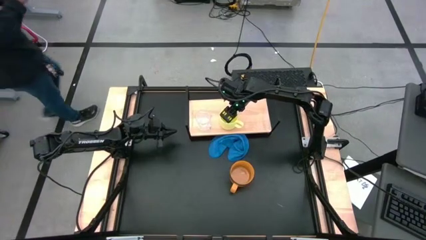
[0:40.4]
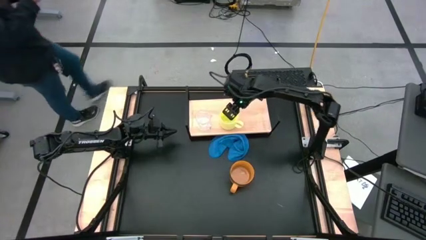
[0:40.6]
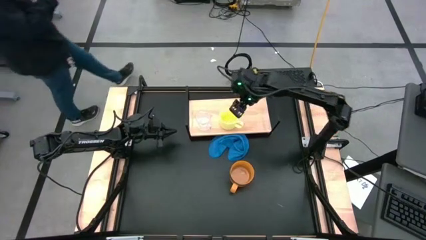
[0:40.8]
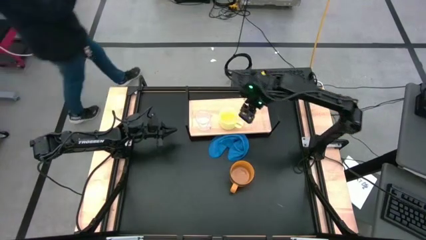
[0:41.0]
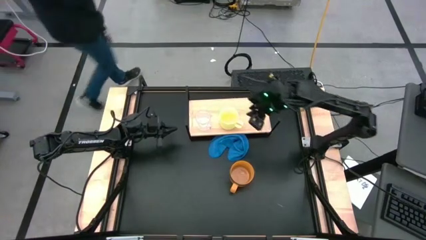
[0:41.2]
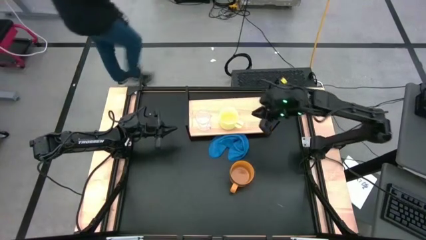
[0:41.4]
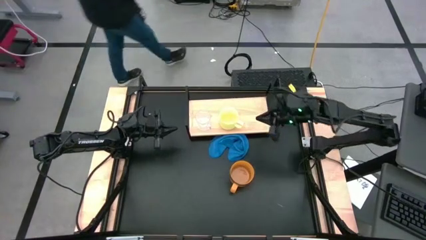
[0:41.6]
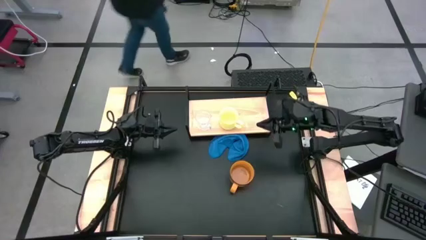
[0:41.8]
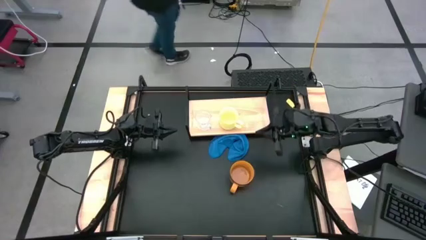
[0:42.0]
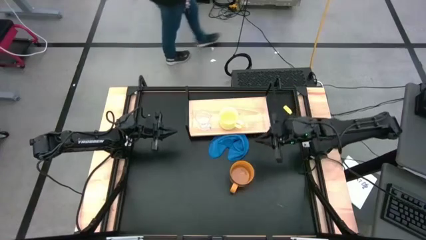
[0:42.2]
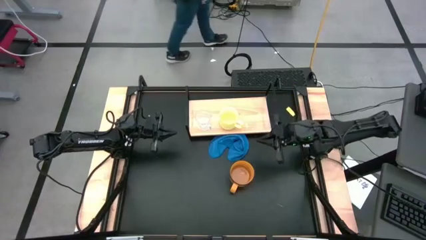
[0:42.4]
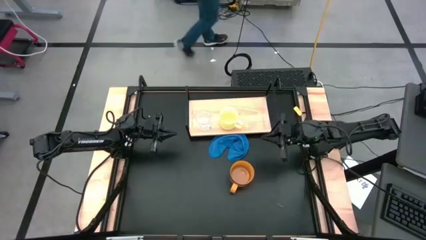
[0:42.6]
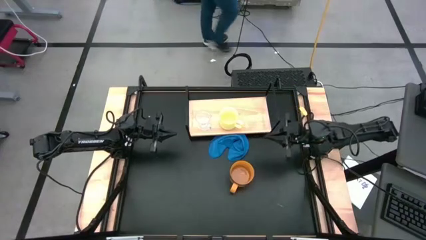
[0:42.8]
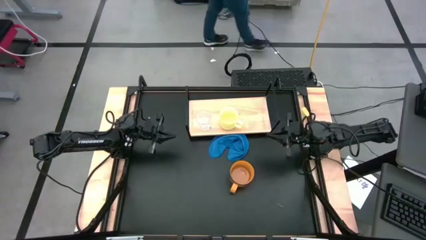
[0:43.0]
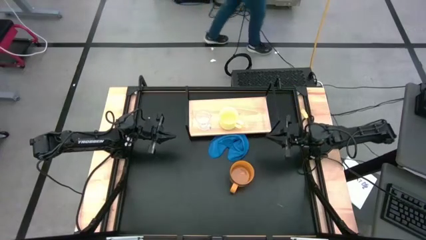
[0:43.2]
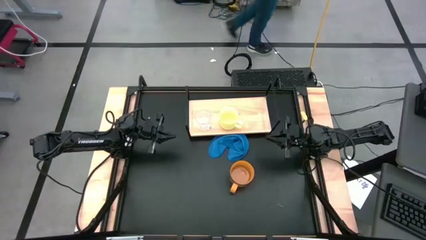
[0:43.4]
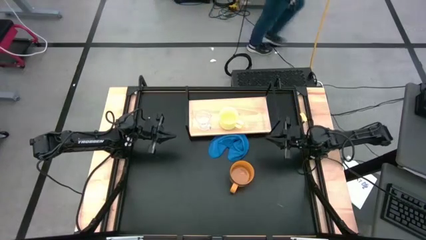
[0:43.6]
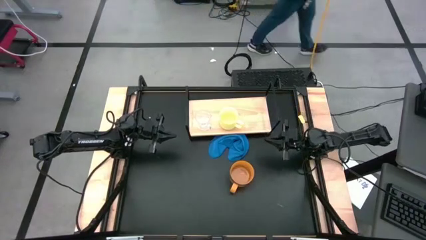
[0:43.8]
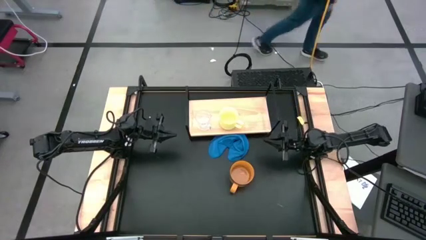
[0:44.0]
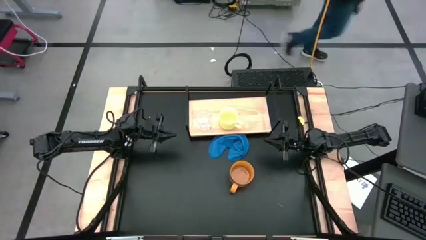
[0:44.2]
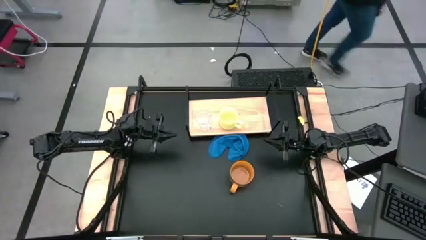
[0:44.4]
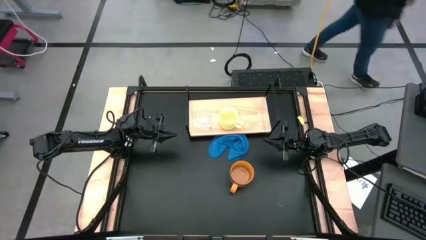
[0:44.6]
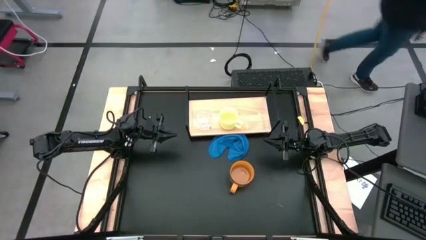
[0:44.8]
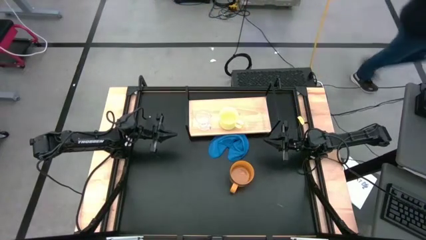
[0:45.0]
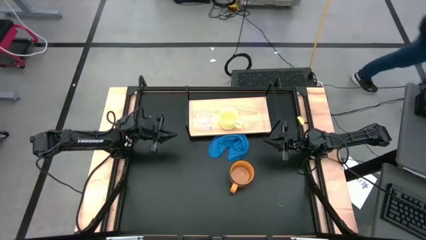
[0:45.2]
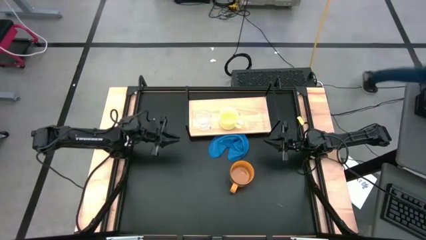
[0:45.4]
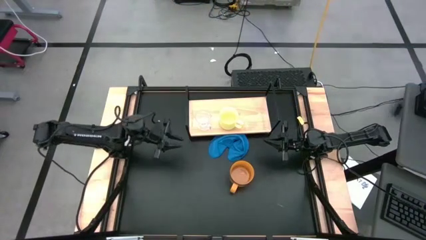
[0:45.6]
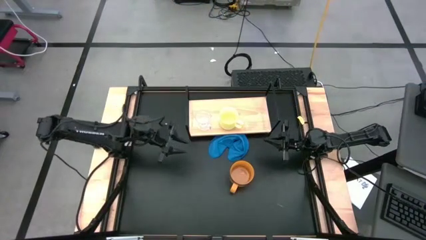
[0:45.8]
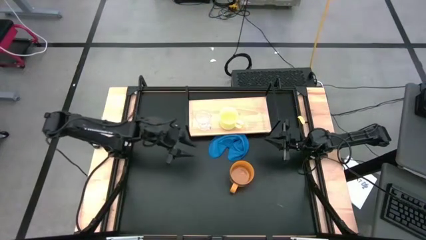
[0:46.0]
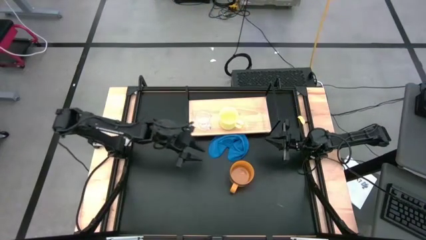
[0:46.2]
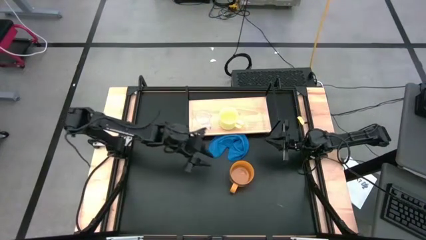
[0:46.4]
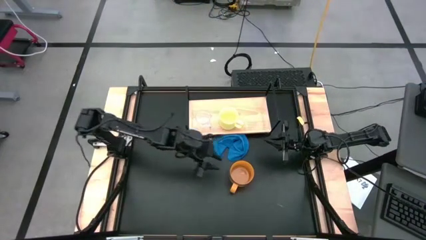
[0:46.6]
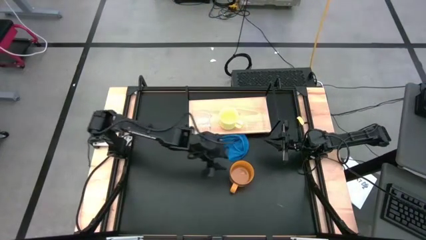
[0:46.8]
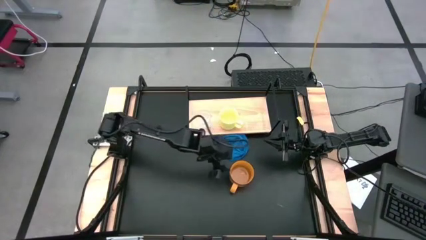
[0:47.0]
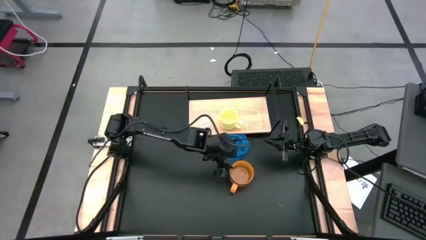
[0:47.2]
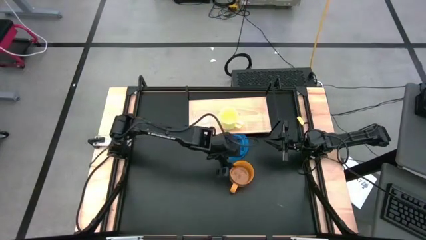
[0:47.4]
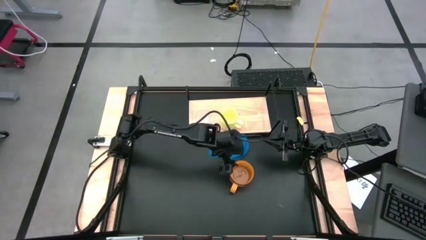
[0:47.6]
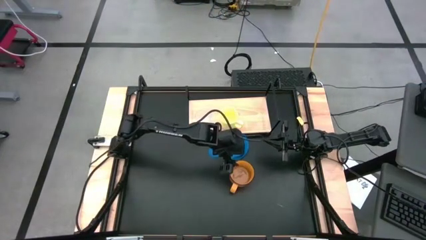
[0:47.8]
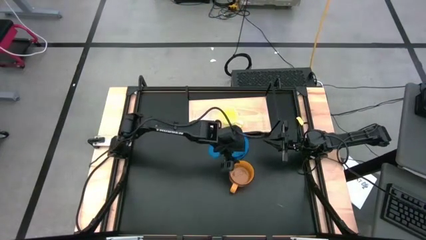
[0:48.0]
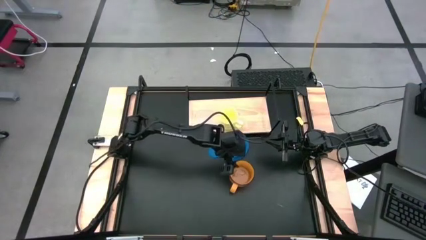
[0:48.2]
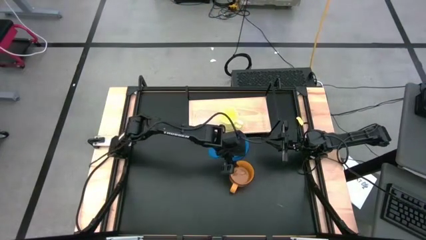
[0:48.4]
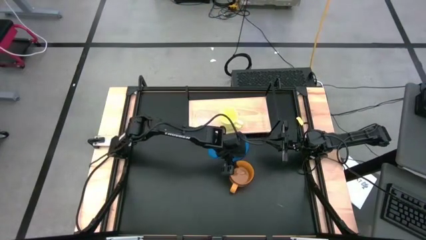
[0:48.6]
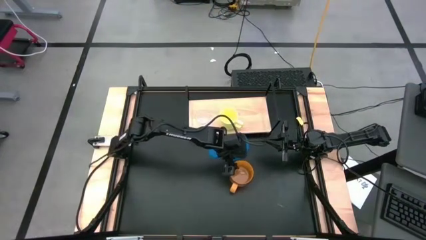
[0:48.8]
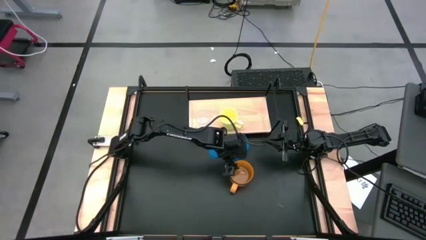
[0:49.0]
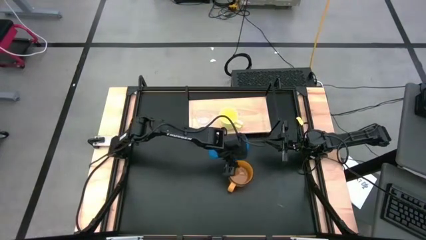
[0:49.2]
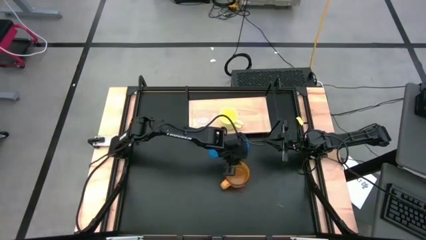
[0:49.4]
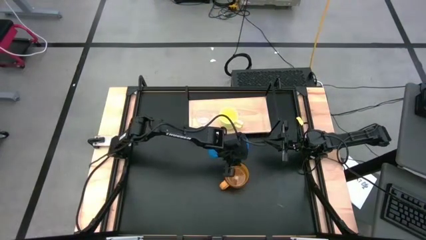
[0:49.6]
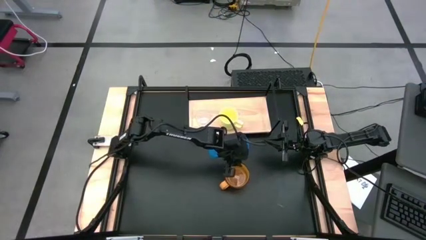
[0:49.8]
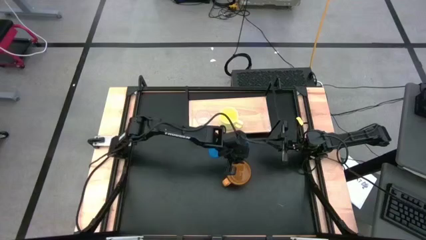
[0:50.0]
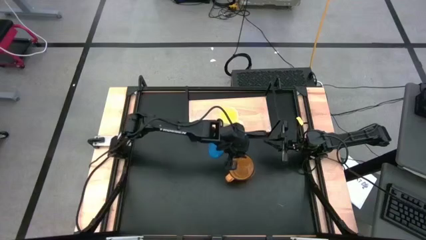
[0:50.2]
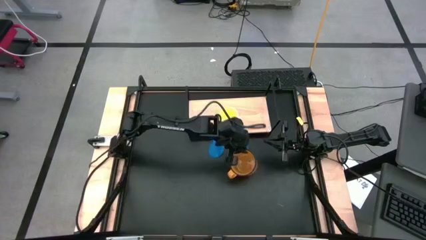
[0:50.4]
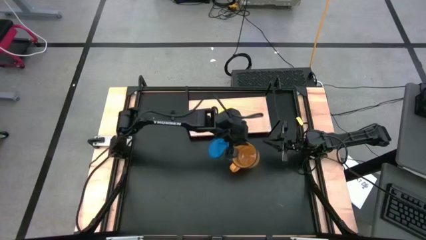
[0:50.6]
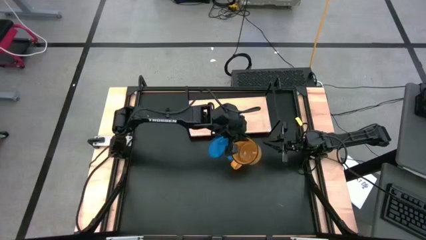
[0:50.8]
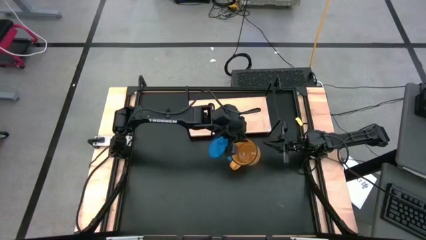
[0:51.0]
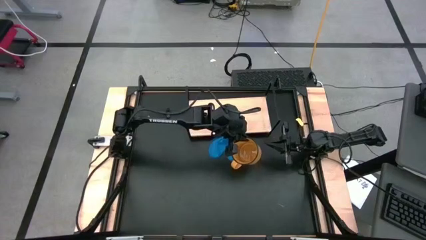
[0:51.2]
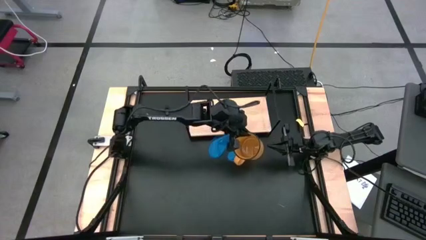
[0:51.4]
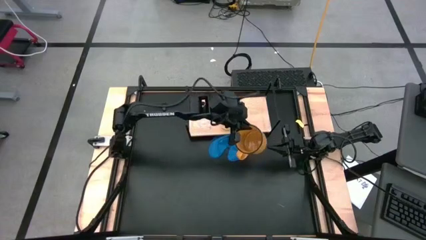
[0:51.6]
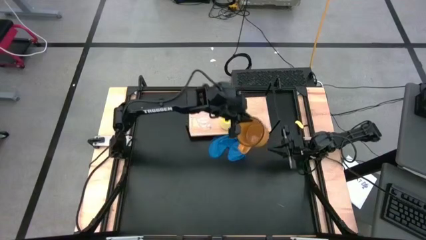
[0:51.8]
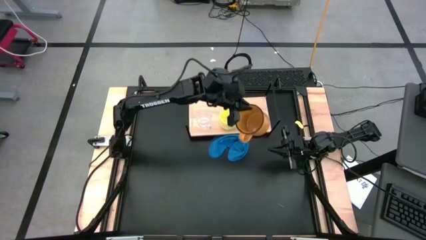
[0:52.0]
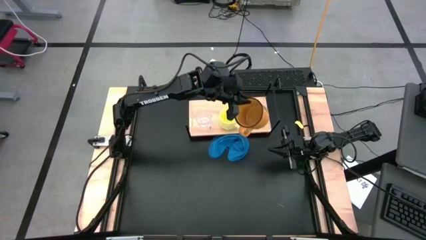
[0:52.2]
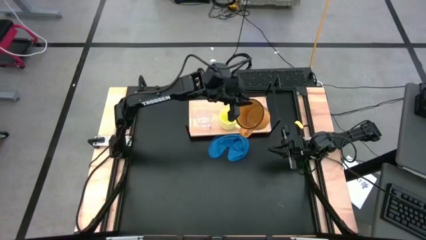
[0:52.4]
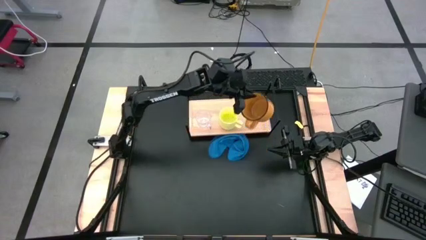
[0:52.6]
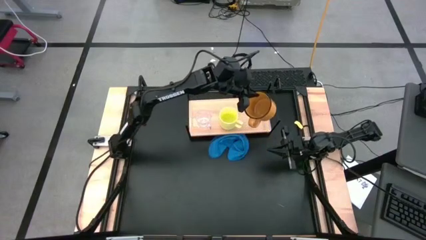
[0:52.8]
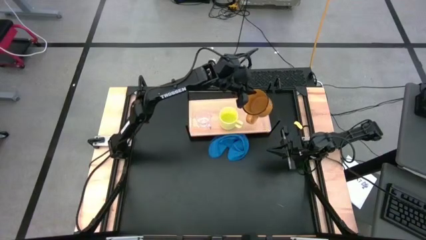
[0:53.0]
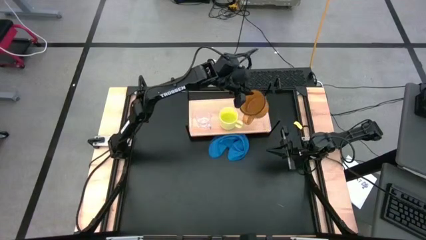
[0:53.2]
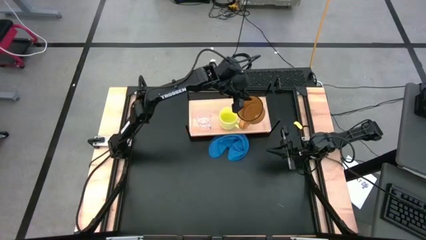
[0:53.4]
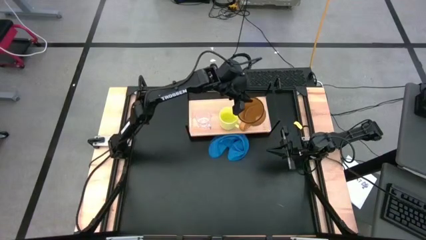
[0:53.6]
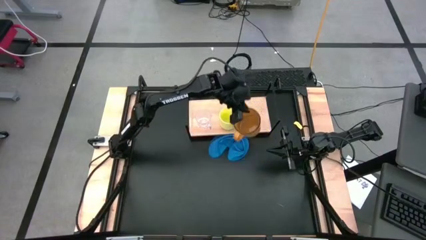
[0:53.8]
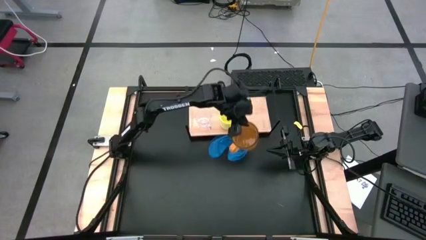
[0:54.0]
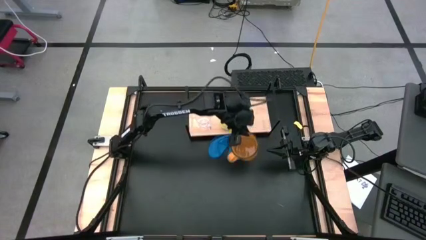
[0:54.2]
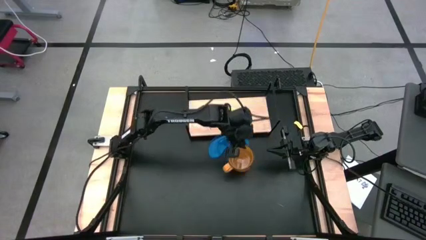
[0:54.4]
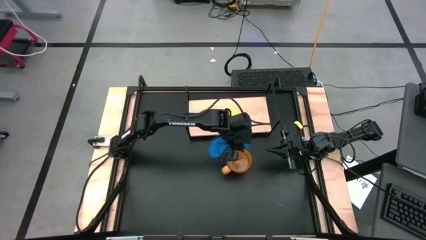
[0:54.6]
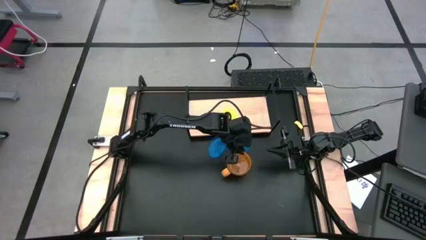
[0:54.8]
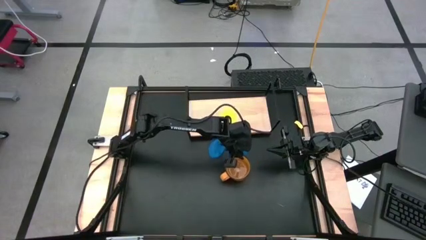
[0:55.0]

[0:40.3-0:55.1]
Task: Stack small to large cups/mugs on shelf
Put the orange mug on the shelf

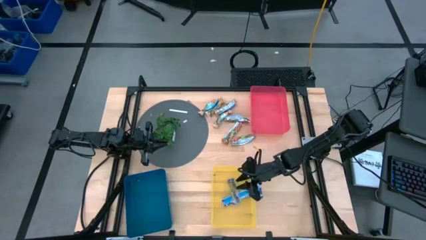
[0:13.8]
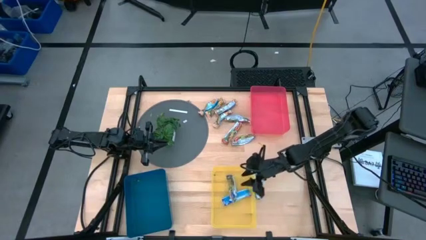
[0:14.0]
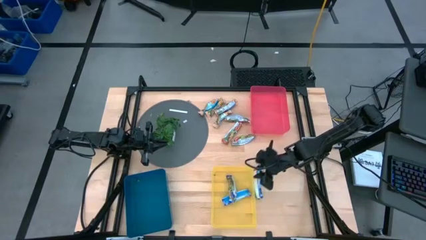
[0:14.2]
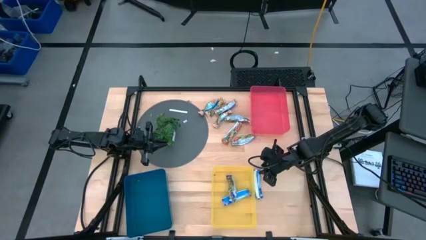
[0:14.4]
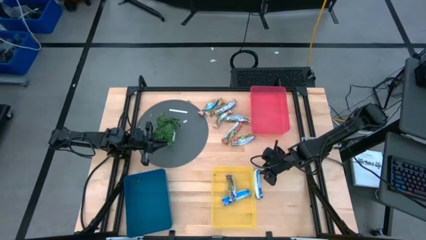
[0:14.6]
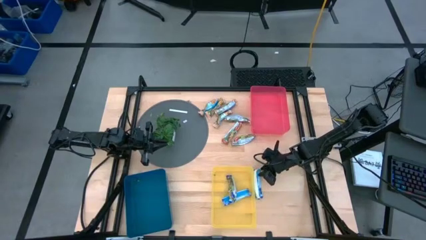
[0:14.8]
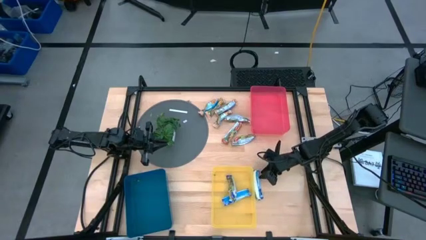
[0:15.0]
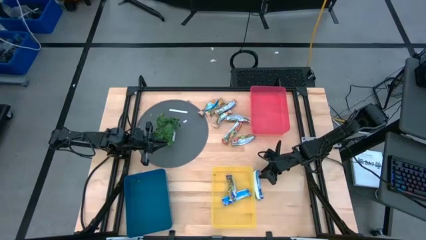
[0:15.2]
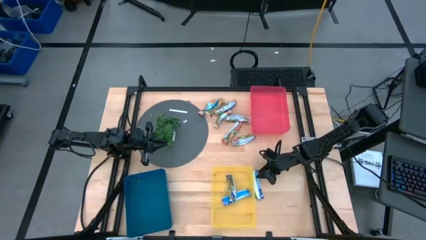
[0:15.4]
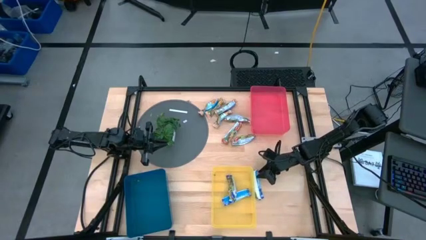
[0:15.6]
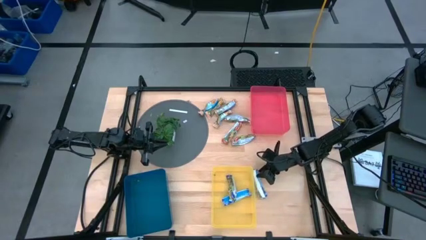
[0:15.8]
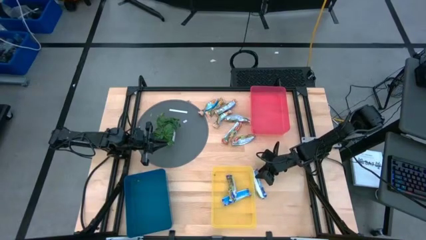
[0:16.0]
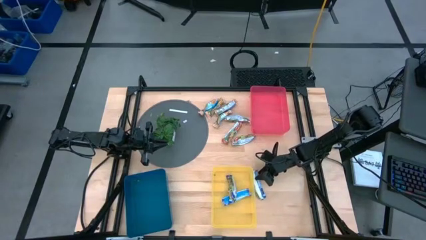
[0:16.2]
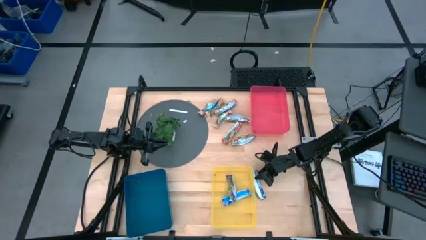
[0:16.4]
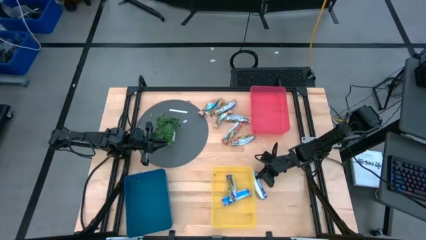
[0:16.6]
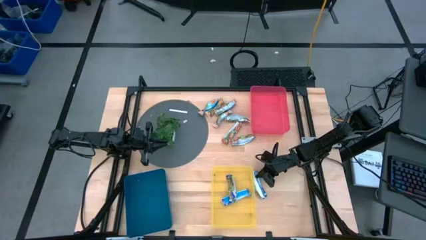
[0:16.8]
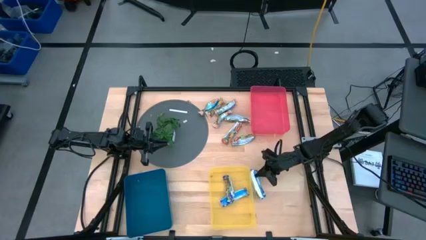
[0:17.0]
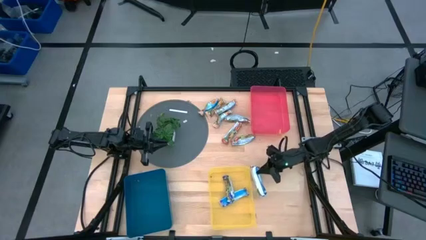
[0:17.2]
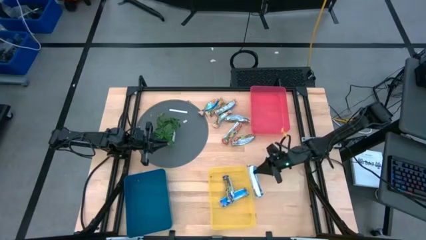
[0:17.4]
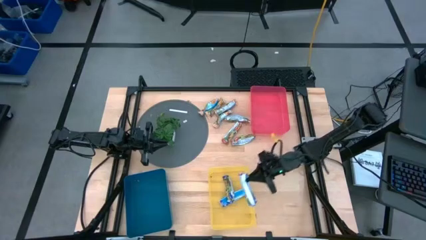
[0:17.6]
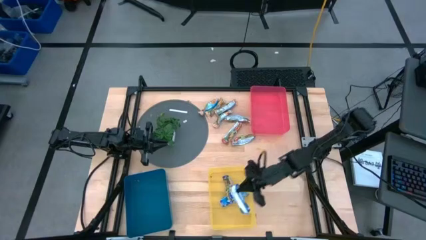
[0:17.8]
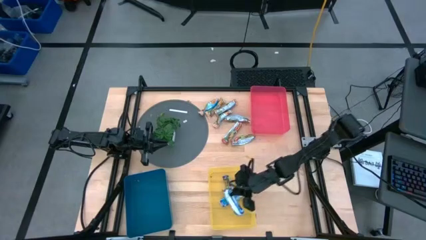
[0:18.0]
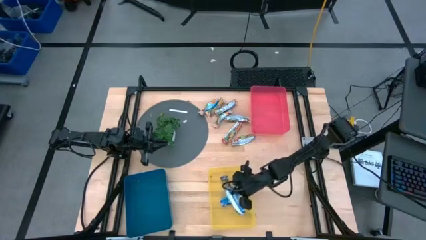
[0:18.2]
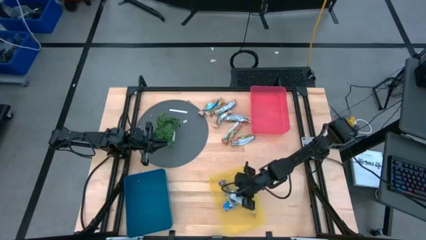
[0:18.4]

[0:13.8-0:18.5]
Task: Pick and place Granola Bars by type
Put the green snack into the yellow bin
